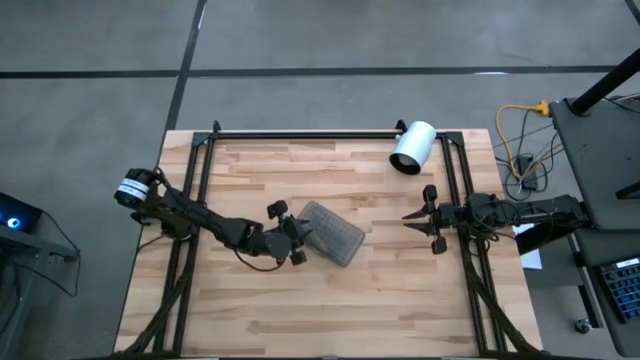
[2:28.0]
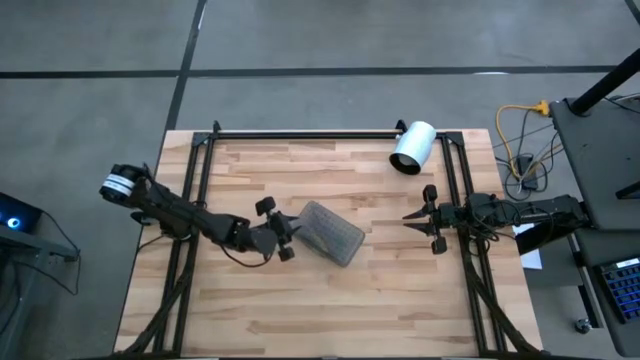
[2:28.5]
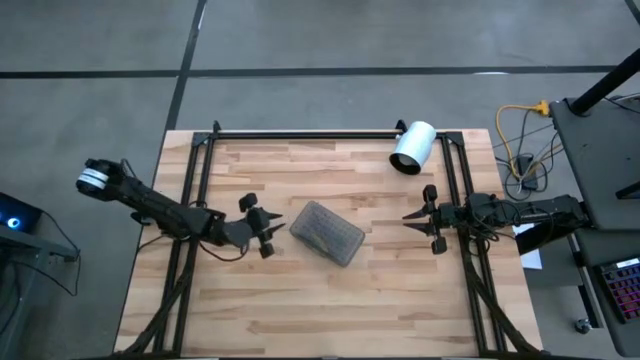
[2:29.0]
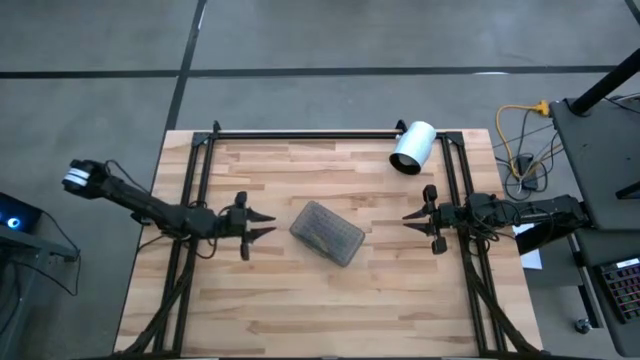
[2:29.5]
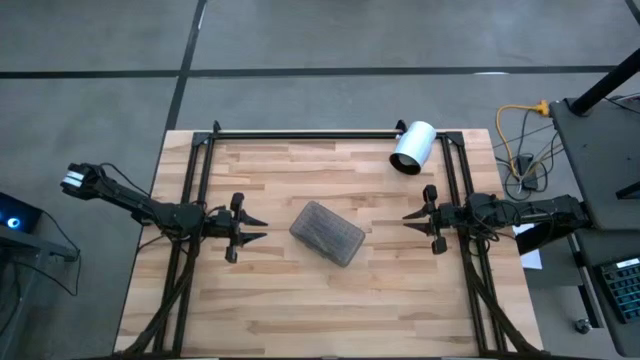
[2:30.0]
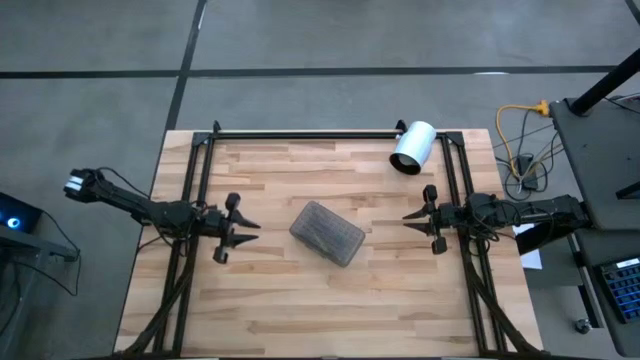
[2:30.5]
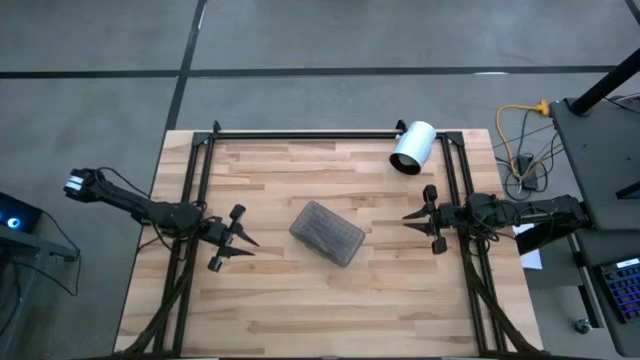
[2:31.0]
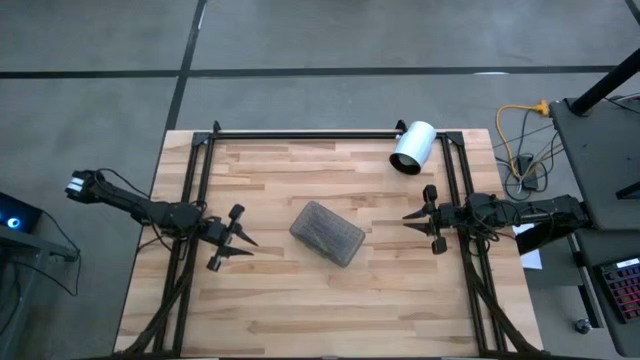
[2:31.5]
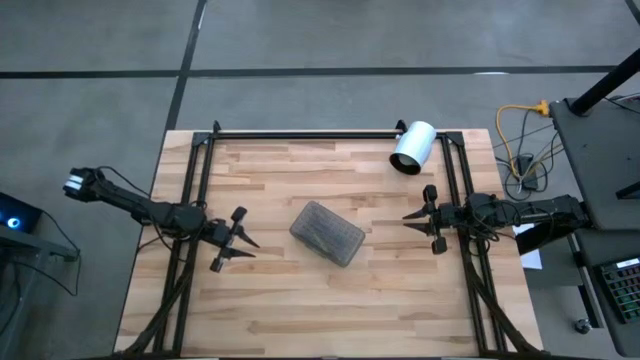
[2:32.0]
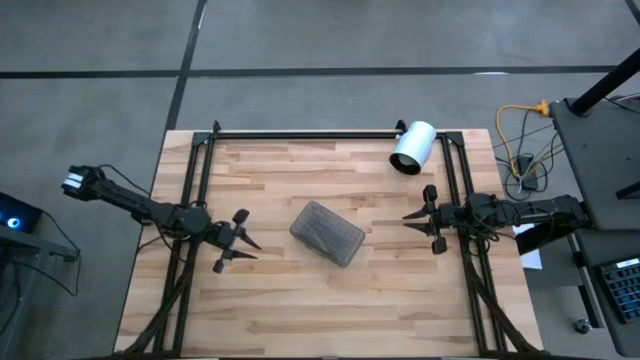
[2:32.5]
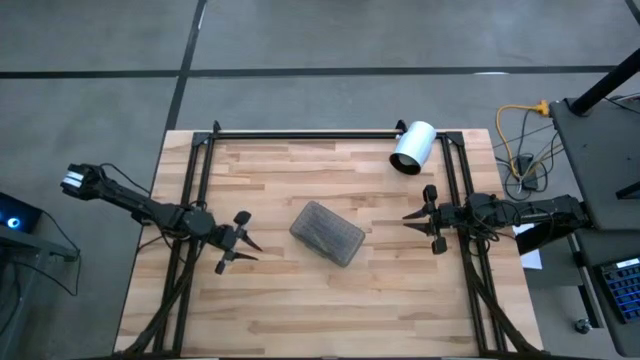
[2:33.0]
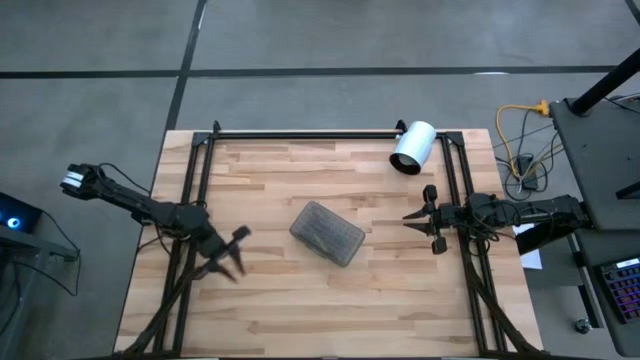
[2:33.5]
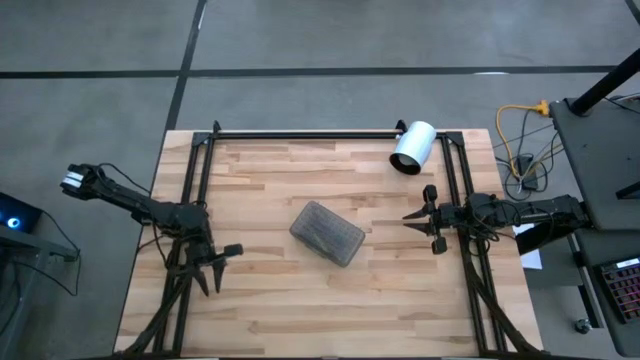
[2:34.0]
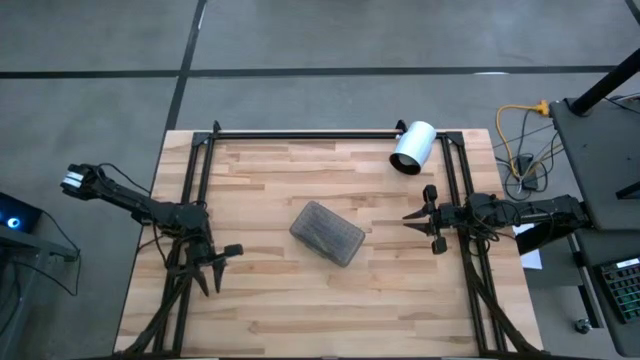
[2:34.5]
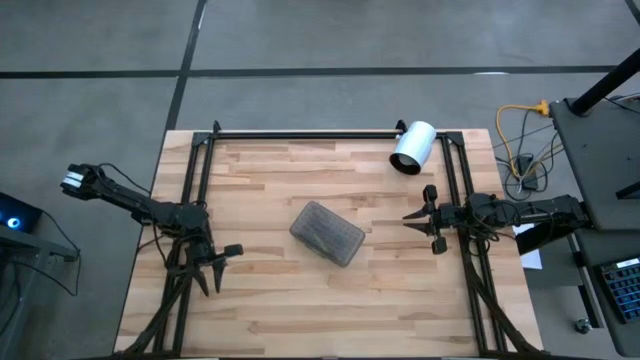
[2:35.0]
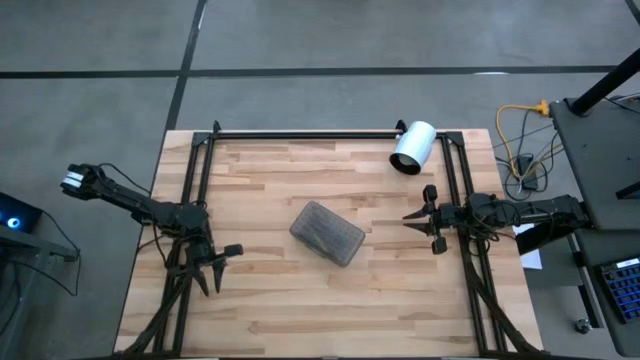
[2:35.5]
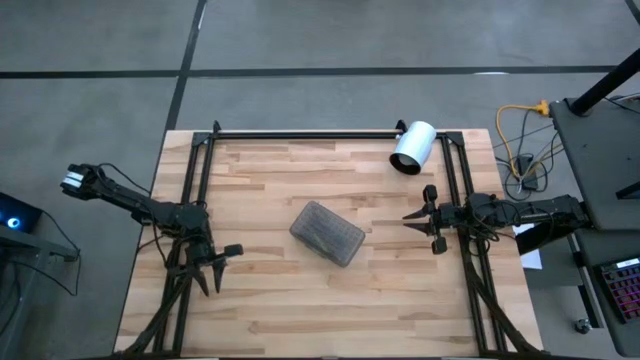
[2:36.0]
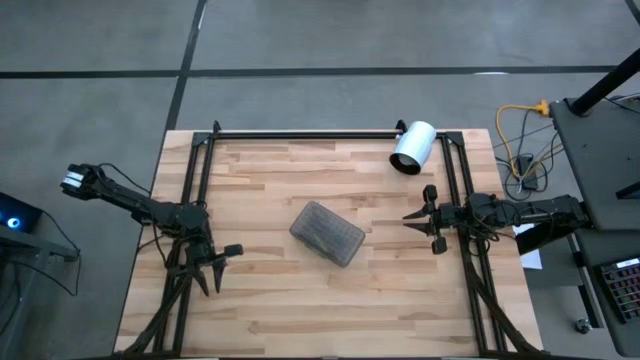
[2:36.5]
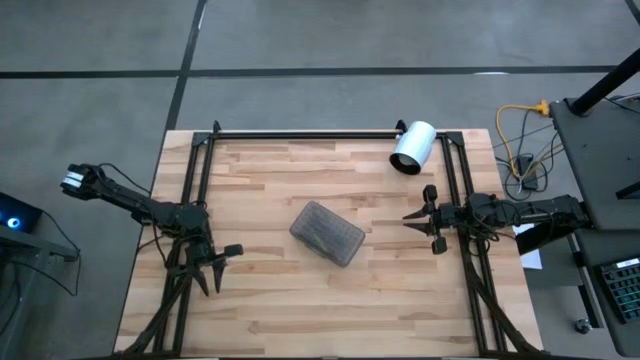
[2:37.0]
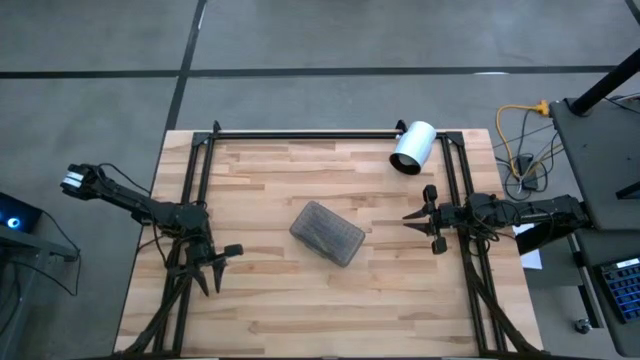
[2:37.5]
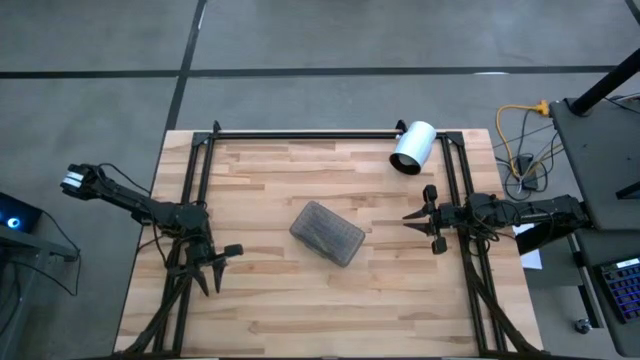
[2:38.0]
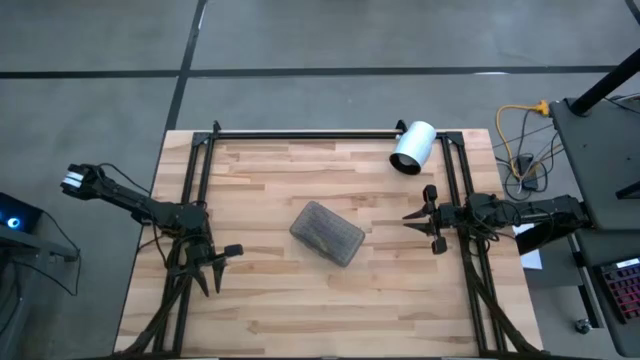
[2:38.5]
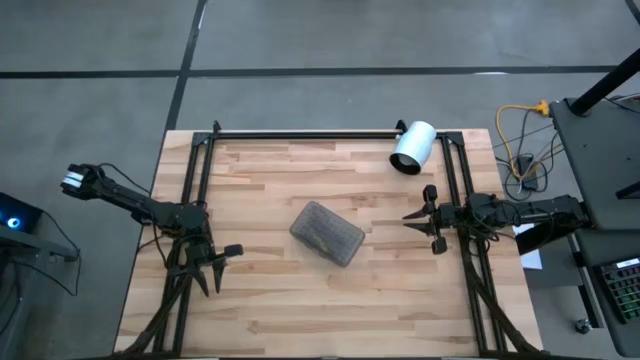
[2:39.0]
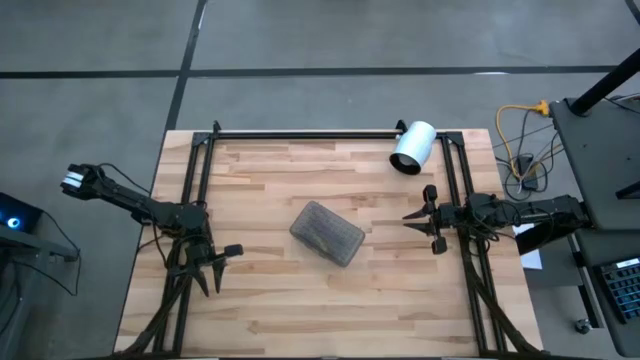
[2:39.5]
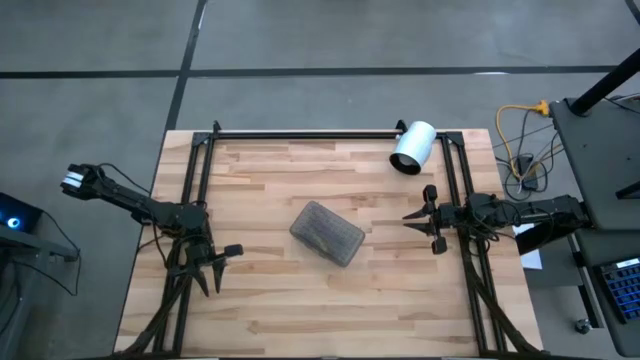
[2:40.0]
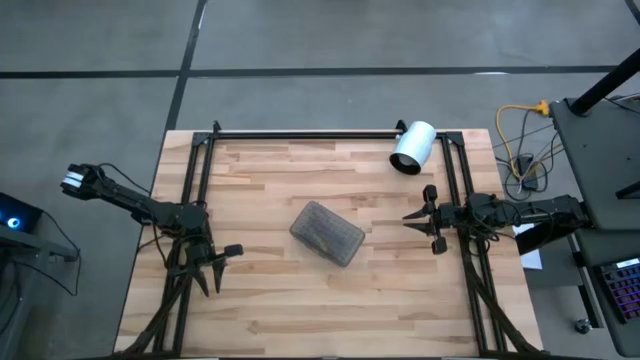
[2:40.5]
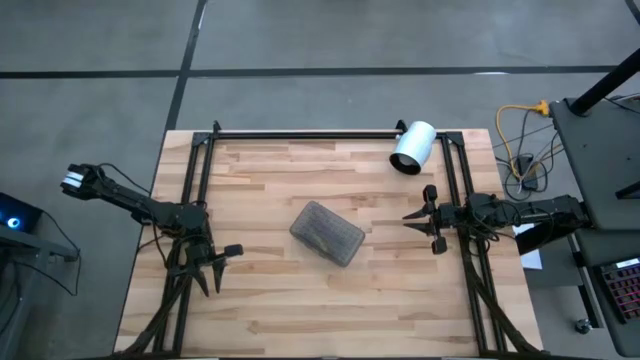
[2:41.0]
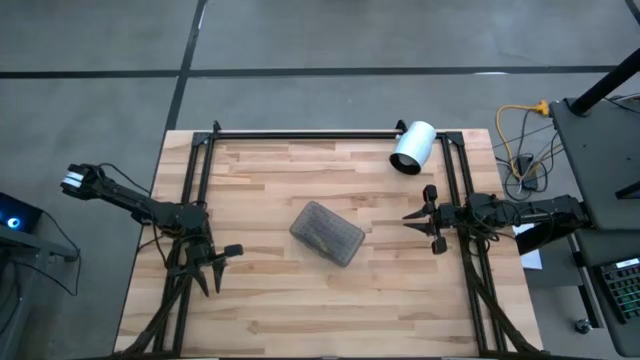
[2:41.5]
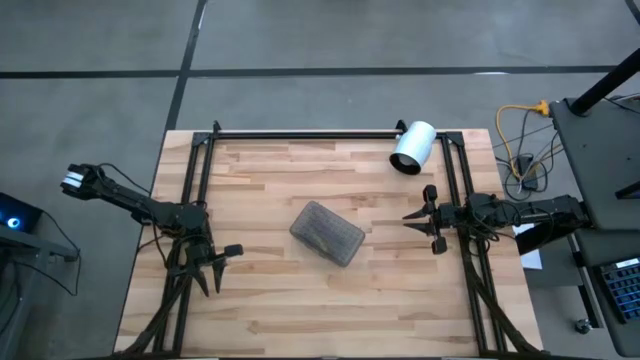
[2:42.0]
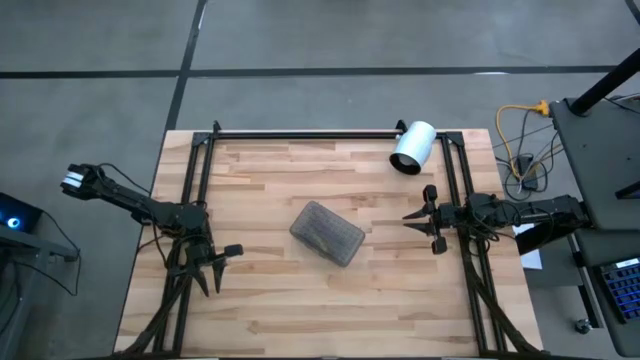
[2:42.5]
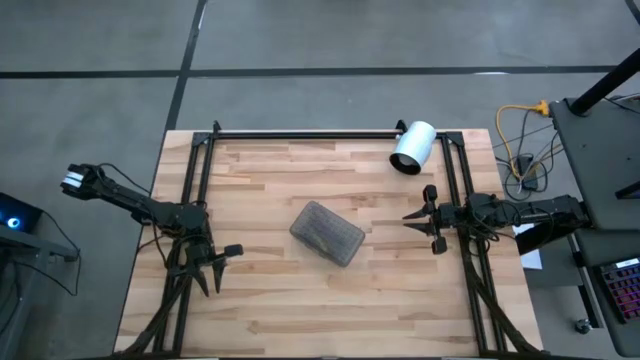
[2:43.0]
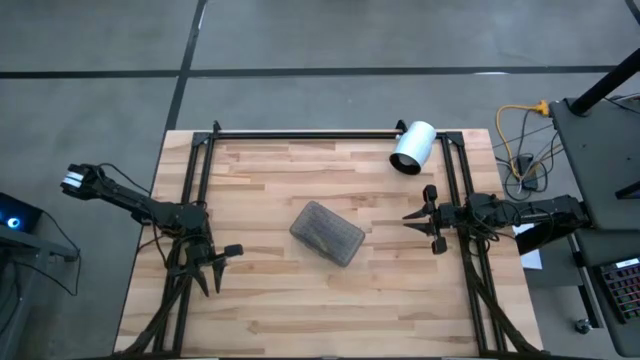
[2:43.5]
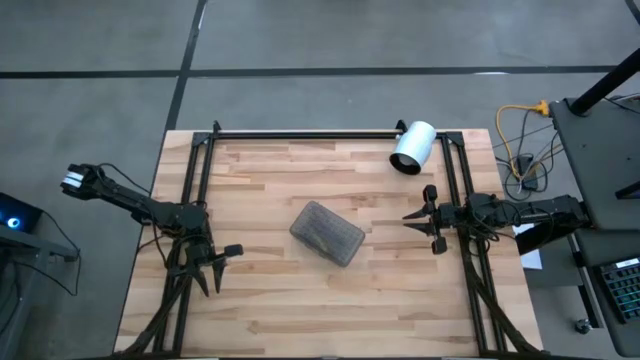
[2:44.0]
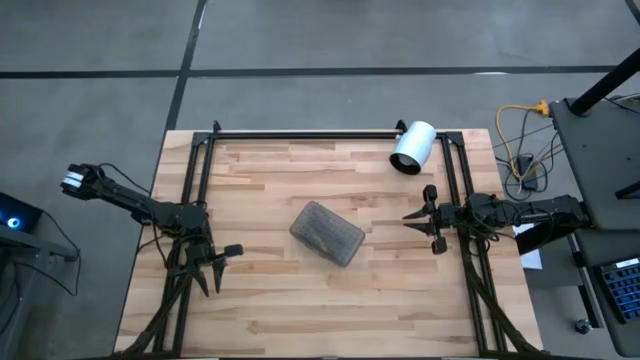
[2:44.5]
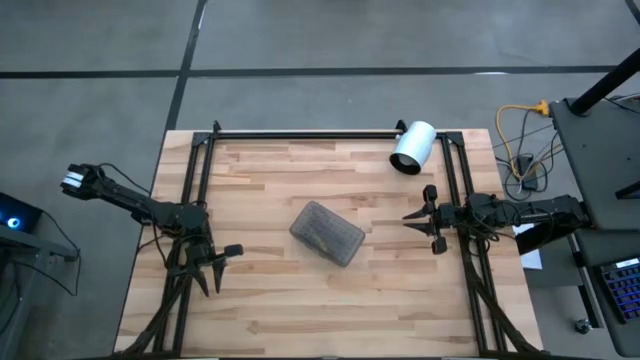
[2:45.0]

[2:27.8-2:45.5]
Task: Pick & place school supplies into a supply box
Return to Home Position

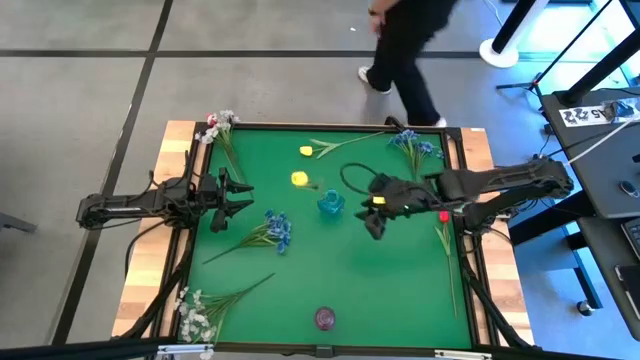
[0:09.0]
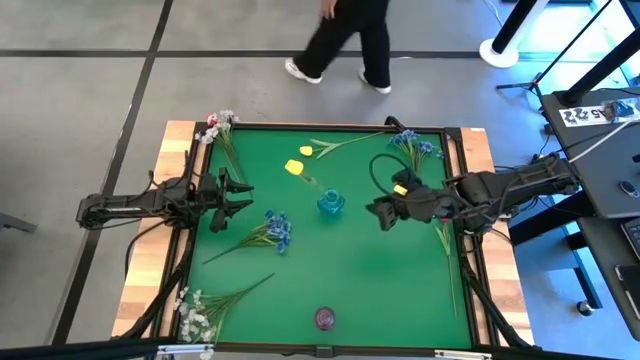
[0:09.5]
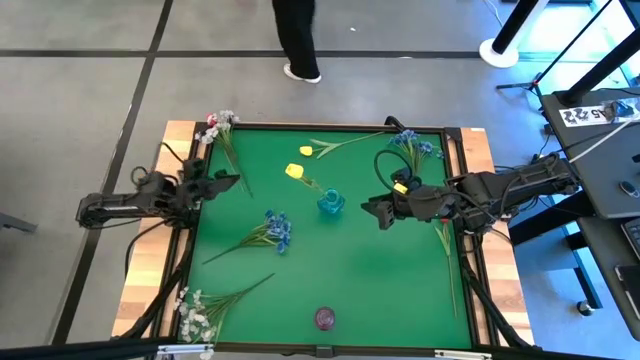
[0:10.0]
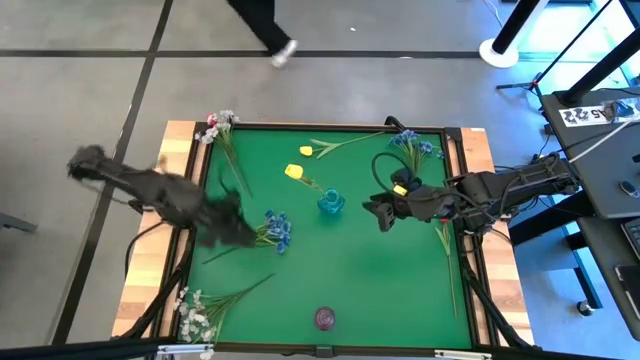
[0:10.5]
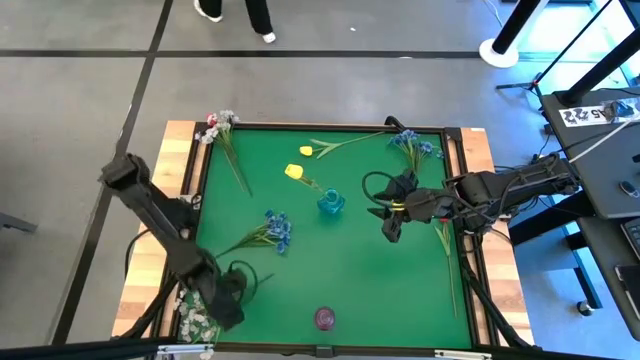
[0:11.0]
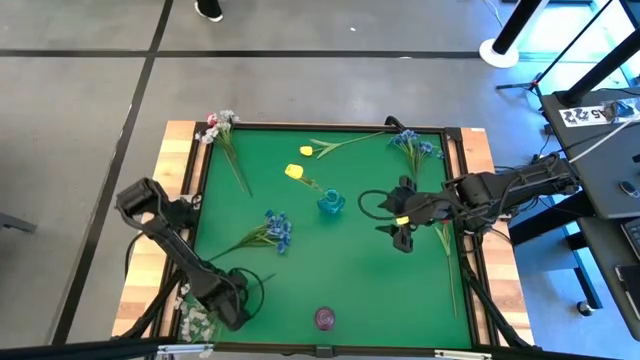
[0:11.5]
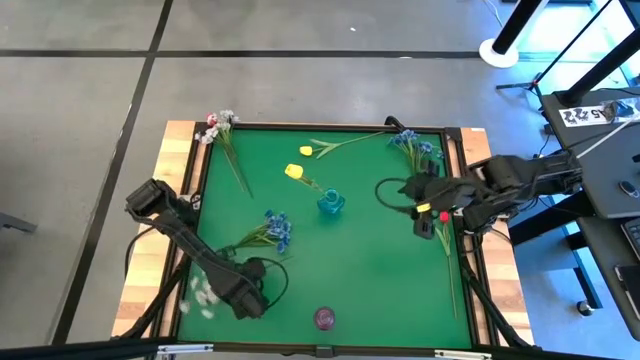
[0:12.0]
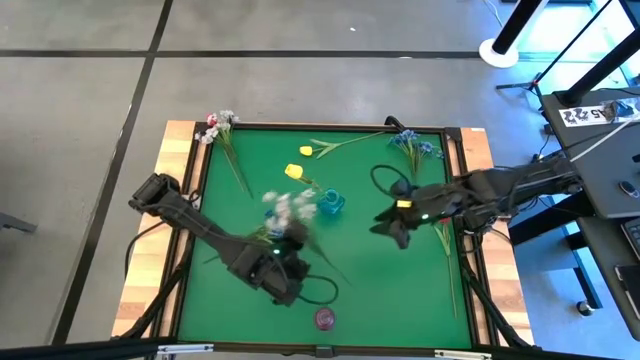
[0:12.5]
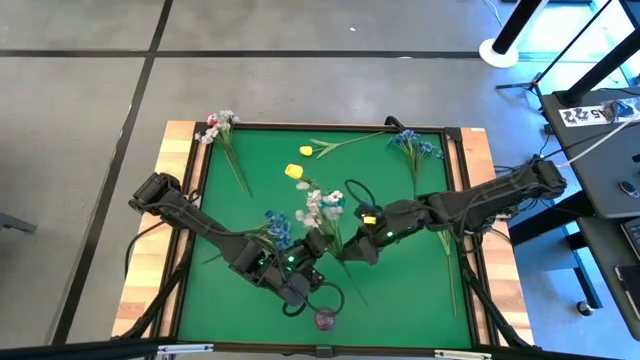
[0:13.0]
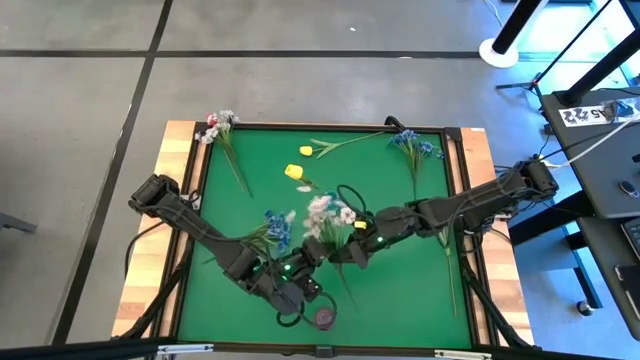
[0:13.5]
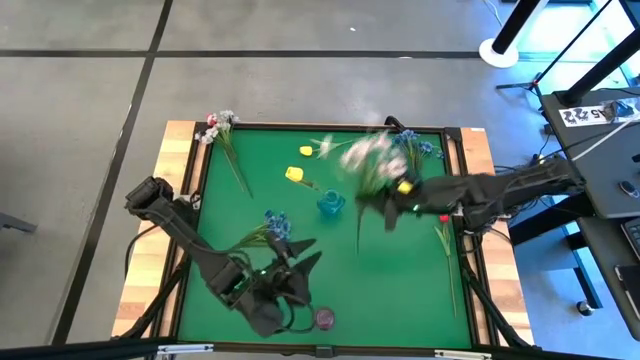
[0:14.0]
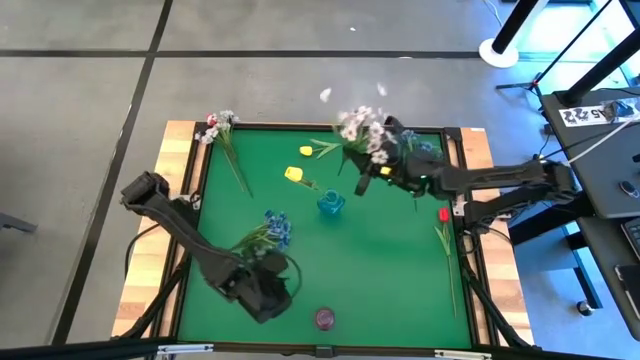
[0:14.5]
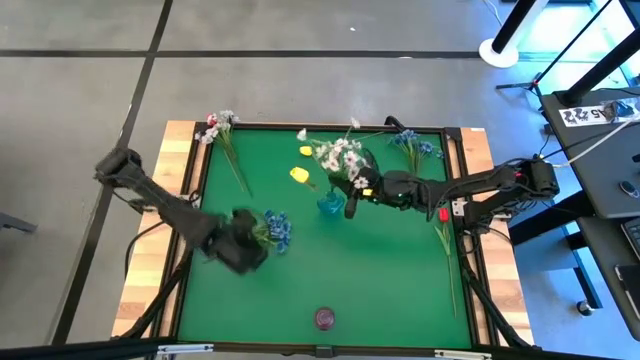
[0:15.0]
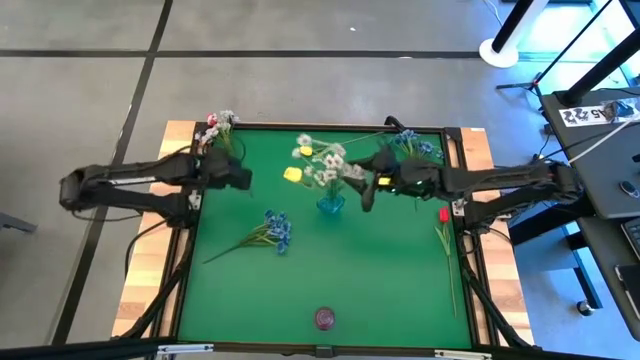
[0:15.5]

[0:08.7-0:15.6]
Task: Sort flowers into vase by color
Put the bottom white flowers into the blue vase
